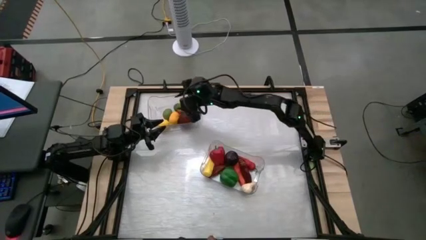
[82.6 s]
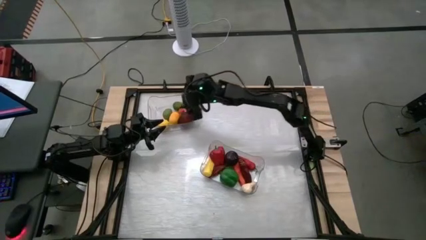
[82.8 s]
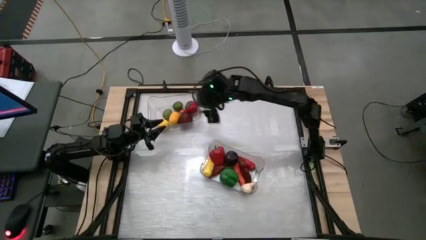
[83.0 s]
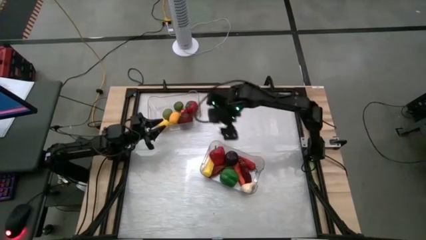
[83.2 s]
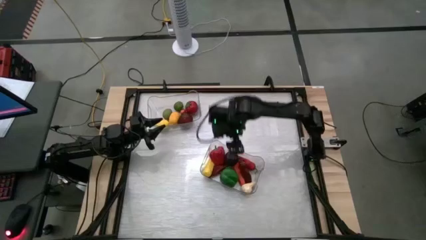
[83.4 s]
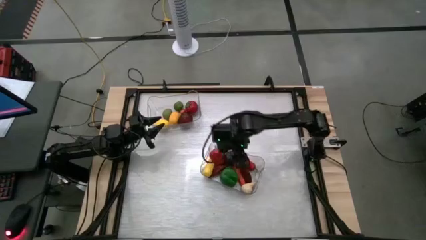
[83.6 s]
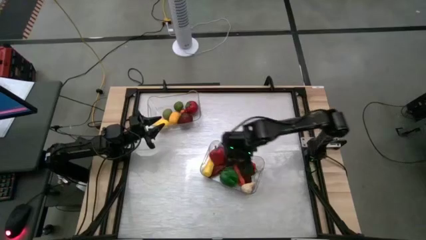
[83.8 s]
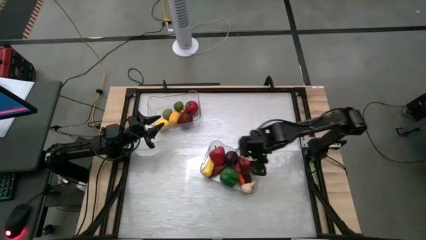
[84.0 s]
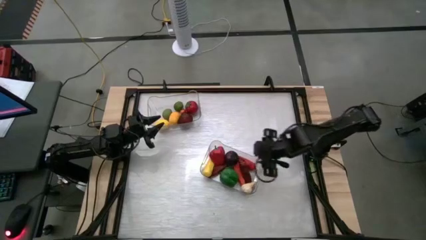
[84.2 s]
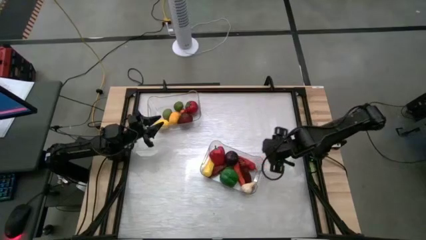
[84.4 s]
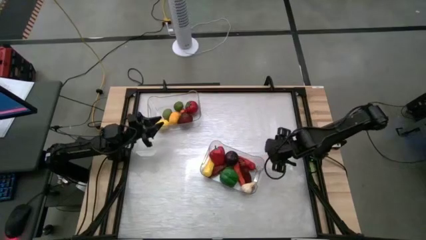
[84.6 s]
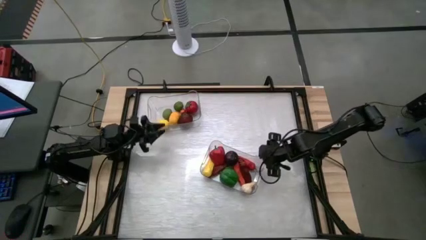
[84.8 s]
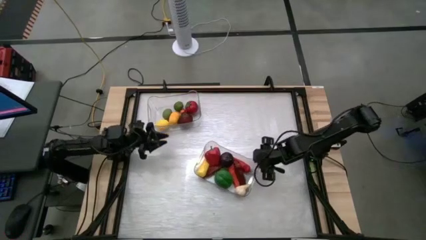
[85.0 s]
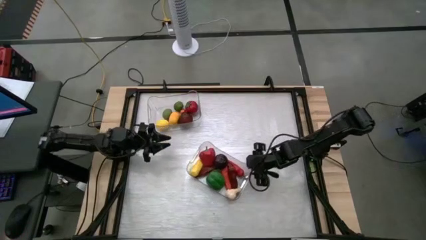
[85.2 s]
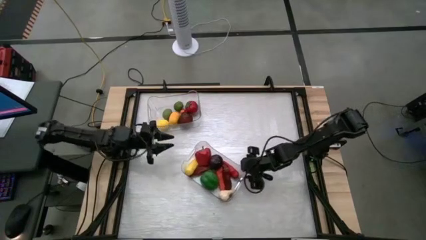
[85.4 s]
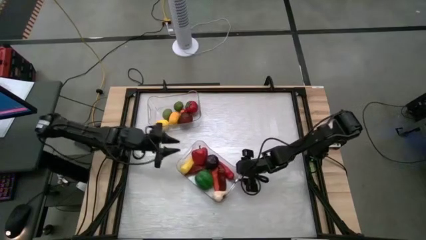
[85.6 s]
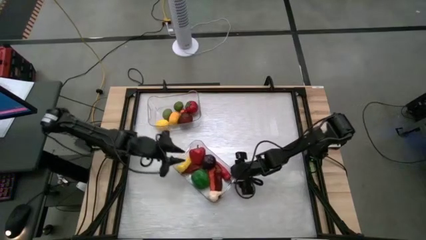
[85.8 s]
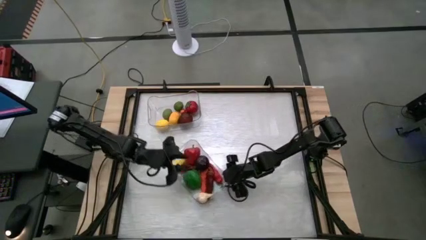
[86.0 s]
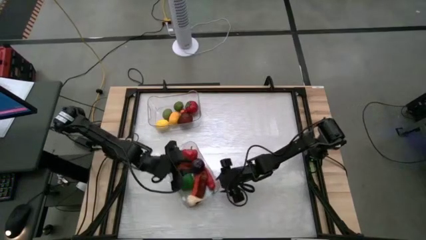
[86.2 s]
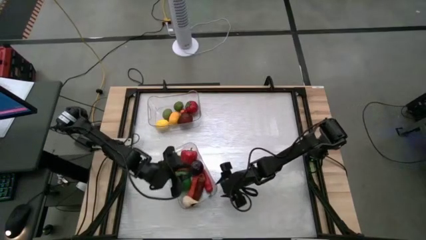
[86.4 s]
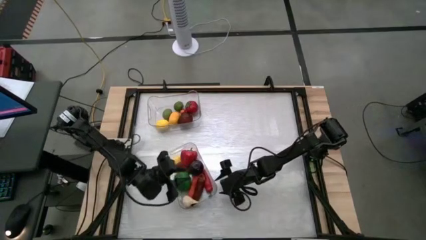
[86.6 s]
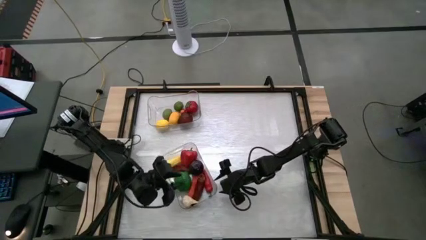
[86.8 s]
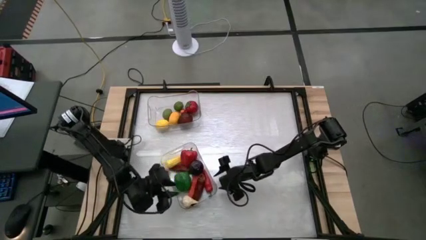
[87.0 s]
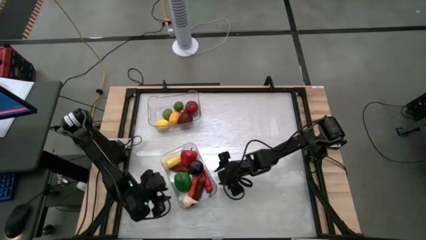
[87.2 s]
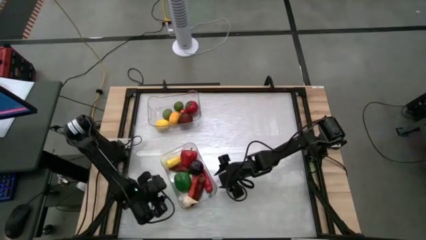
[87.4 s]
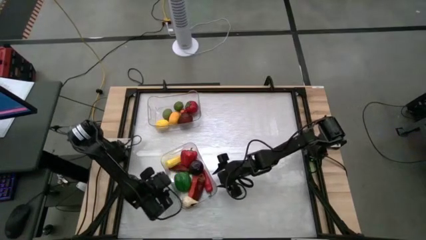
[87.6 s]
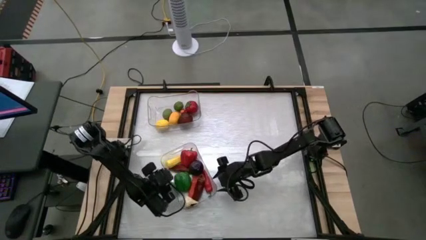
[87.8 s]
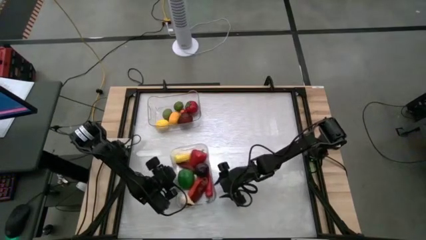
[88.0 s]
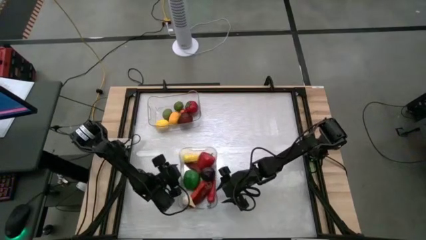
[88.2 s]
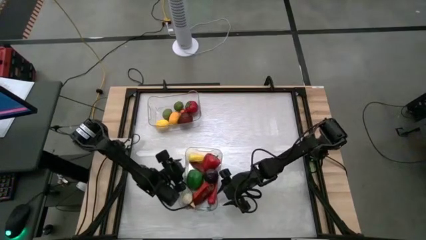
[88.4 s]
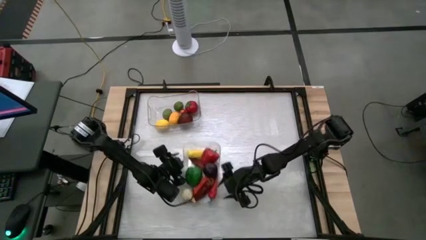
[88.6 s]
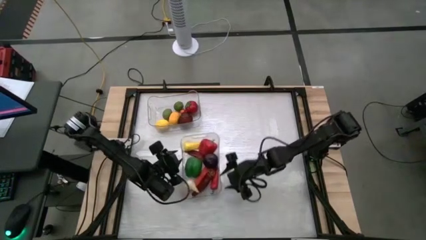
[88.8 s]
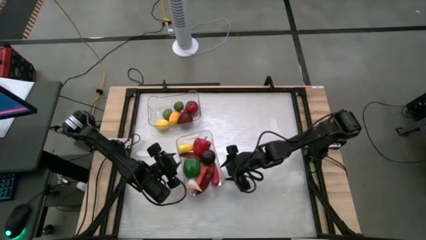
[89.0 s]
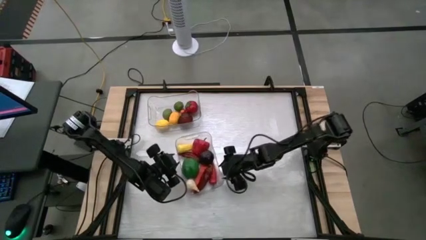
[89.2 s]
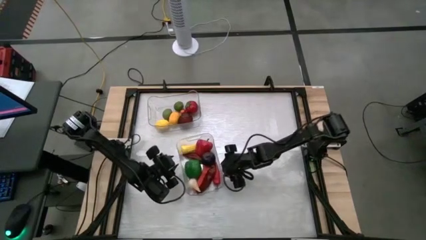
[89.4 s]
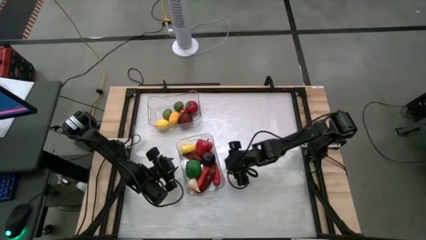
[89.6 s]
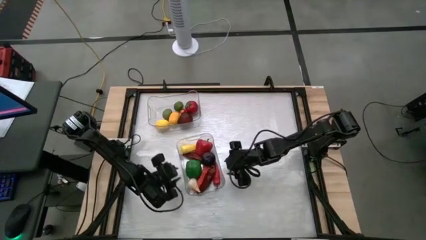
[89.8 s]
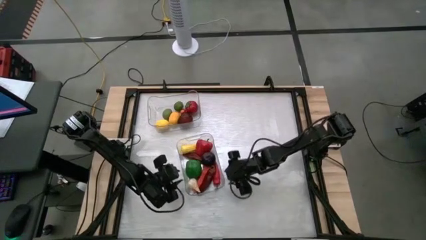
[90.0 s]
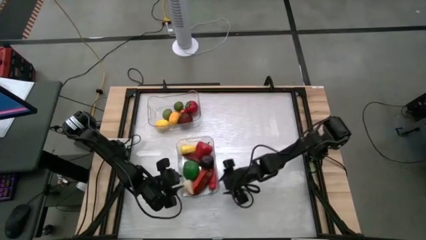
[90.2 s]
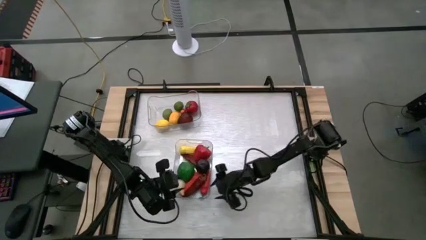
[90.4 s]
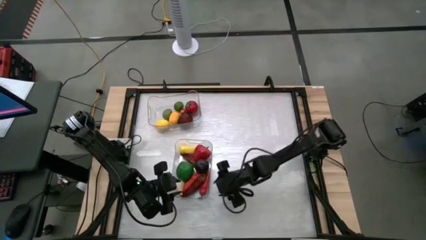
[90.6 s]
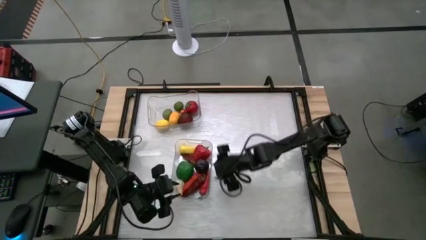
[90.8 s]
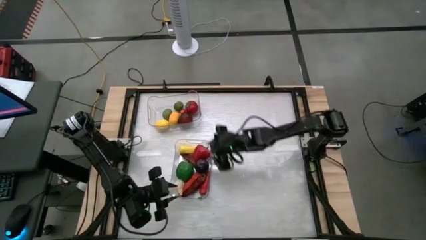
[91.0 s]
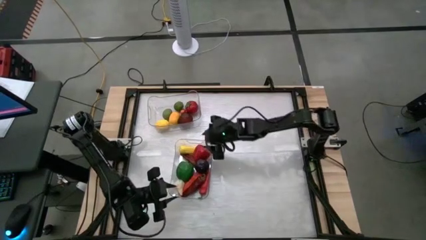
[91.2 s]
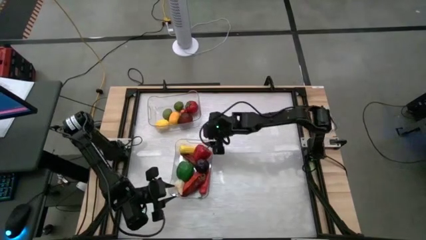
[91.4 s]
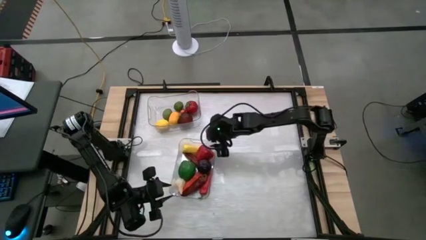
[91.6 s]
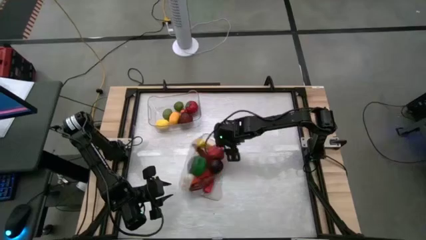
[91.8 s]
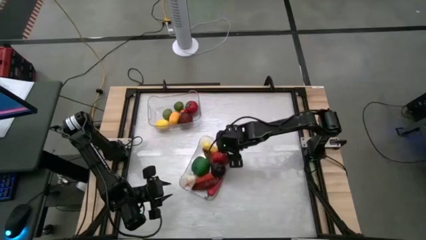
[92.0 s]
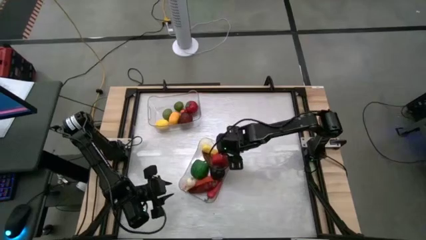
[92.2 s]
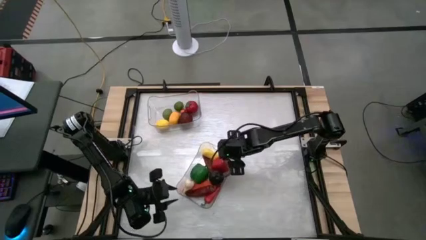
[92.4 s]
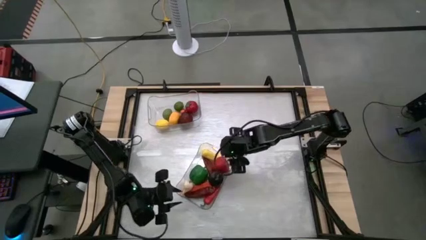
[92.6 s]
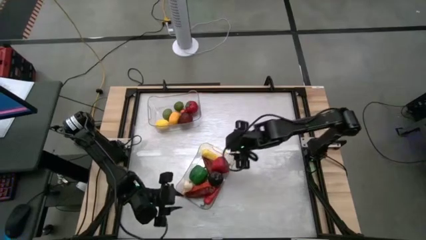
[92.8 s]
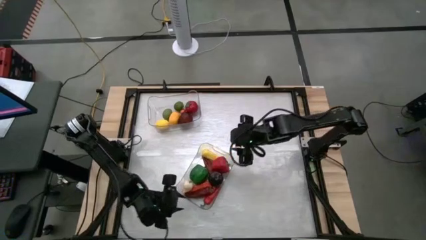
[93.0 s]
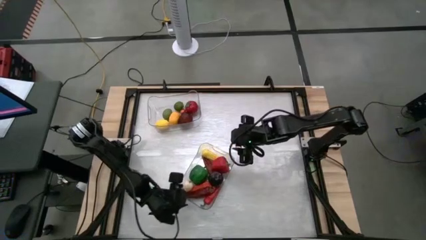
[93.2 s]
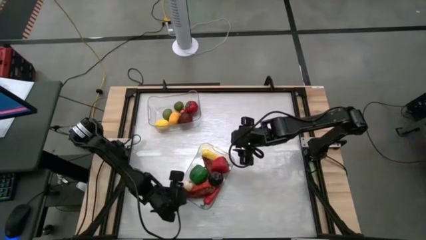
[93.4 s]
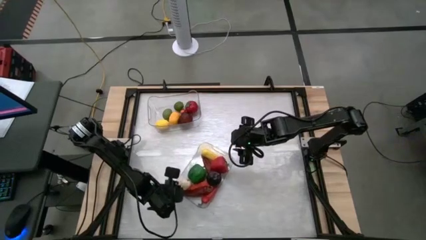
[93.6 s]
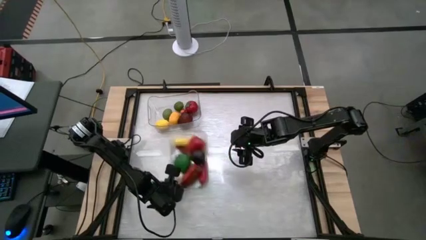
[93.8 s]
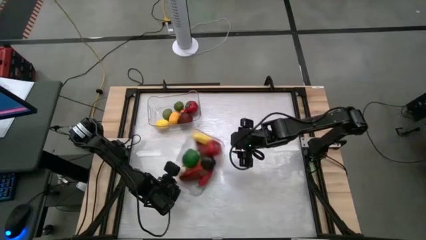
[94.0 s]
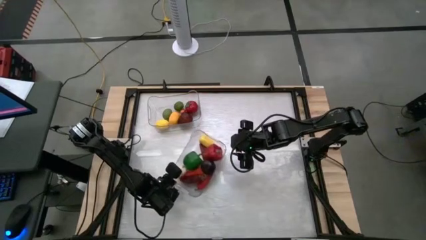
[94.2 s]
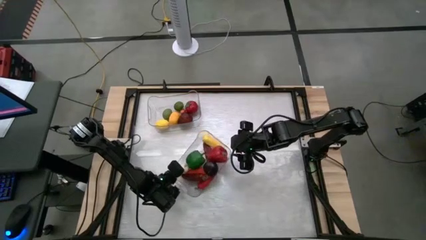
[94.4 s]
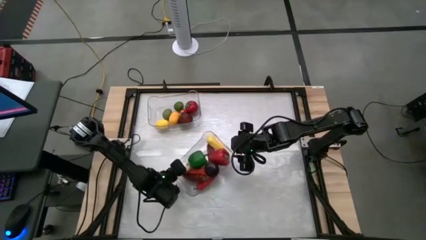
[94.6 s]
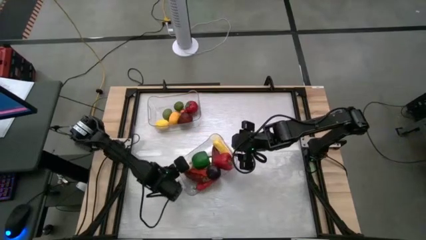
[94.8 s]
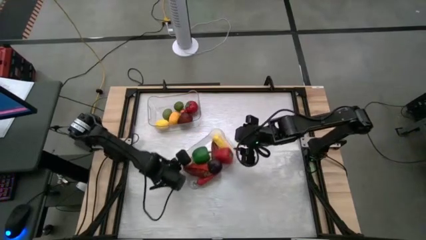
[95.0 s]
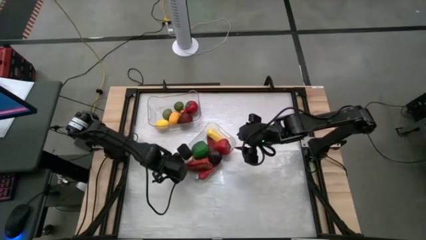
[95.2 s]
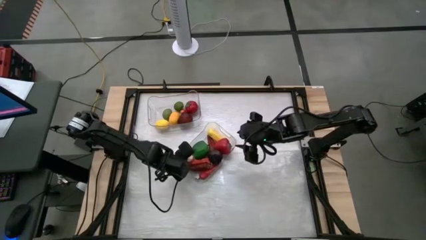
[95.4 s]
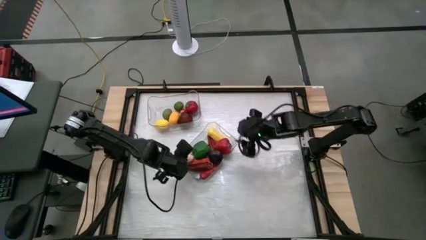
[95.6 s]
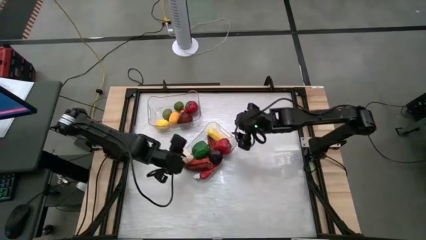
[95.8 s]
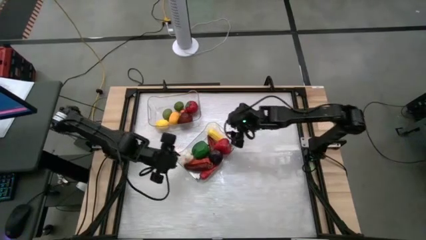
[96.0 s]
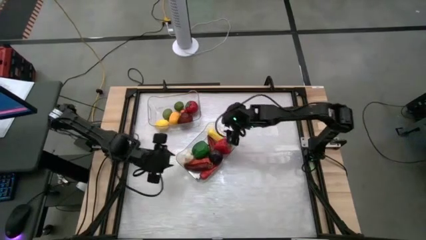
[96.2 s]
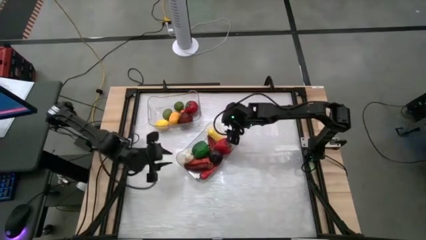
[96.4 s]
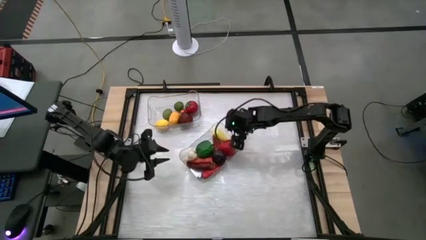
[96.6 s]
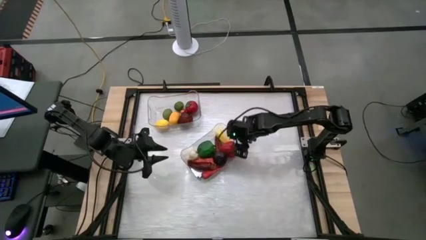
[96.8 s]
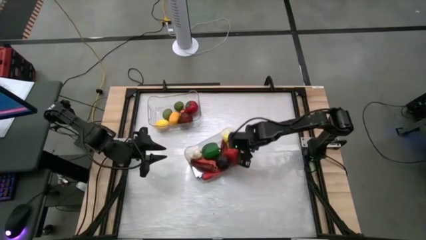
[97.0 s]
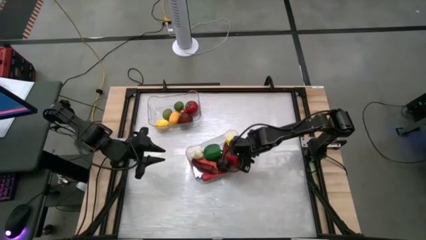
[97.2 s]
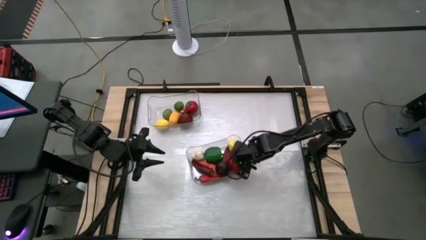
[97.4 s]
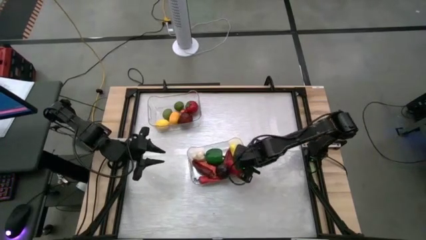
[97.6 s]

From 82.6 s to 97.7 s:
Task: Sort produce into baskets
Adjust the bottom transparent bin

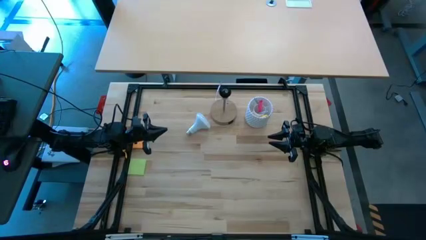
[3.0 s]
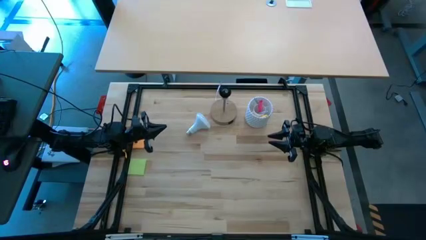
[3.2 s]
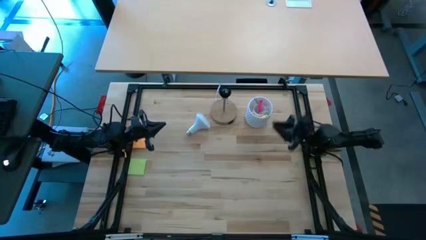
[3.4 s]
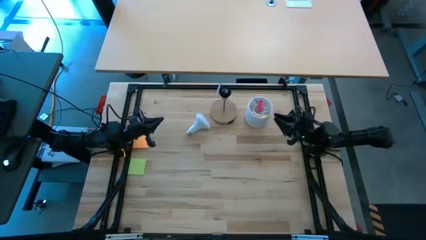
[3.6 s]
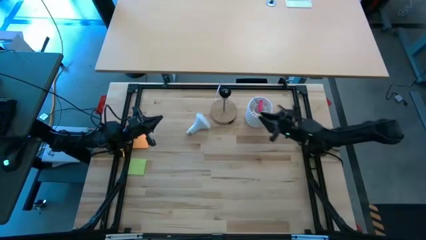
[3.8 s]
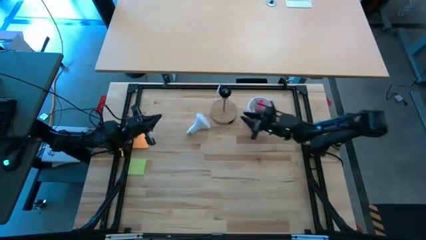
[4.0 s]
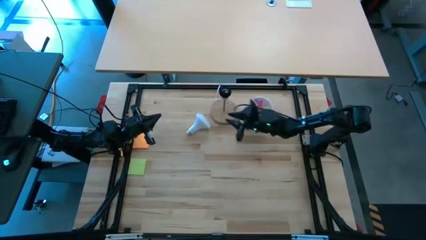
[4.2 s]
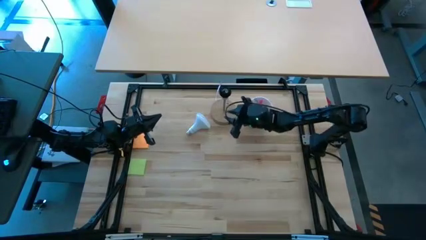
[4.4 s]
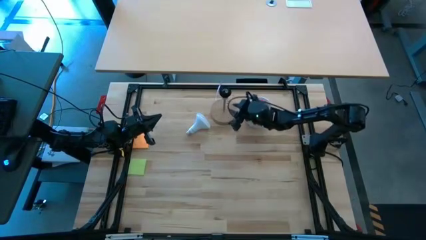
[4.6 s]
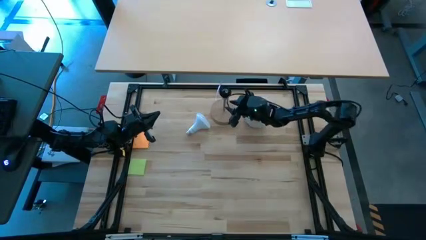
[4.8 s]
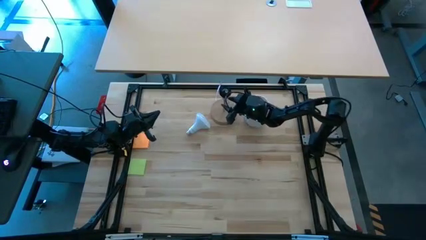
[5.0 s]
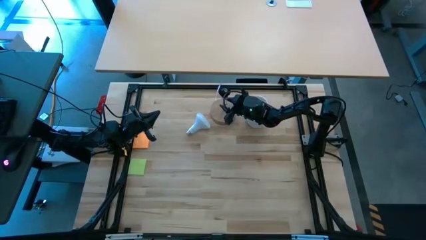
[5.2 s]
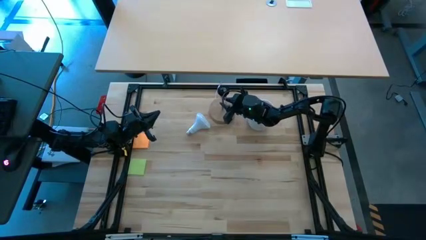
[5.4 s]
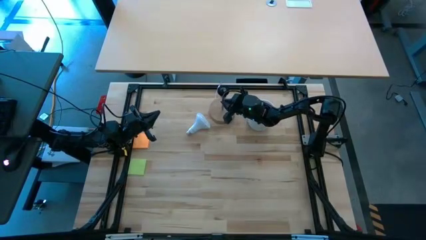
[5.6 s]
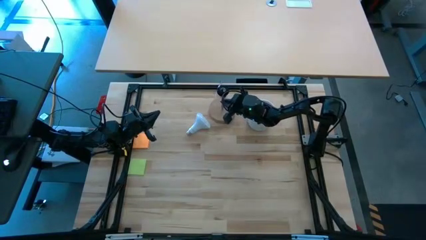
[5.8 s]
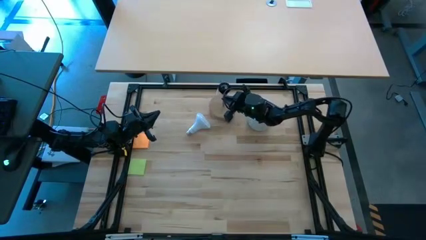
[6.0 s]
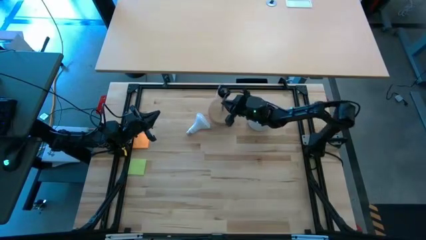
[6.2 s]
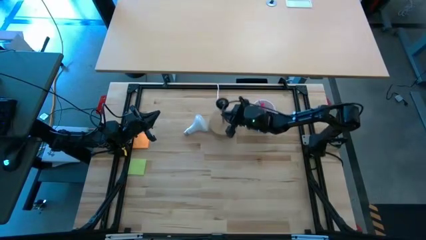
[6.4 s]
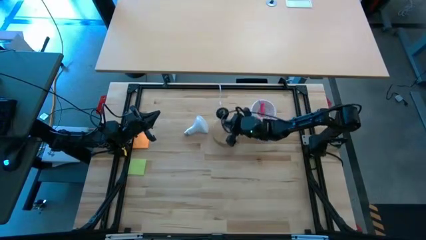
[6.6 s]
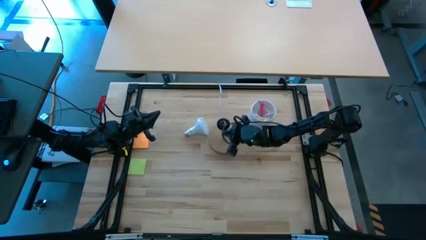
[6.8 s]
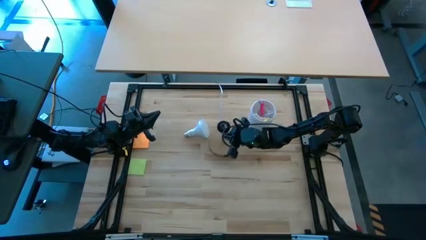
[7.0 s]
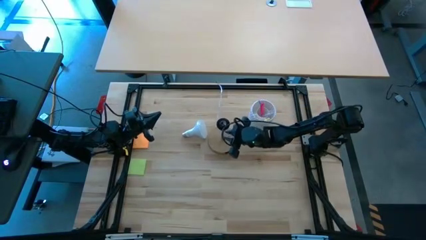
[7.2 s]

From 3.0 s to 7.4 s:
Task: Screw lightbulb
Prepare the lamp
